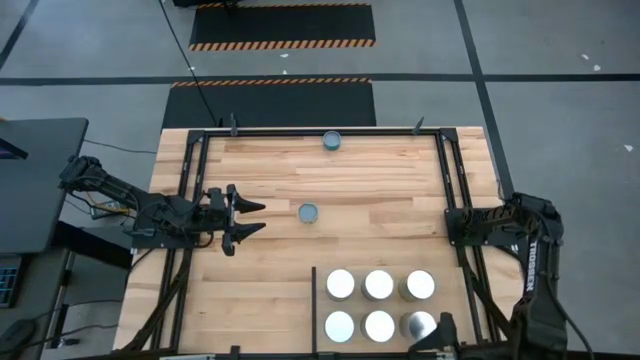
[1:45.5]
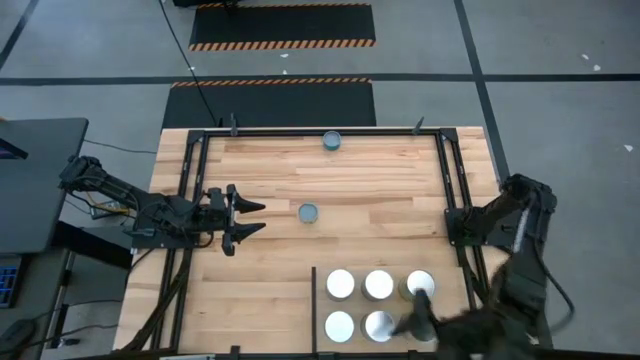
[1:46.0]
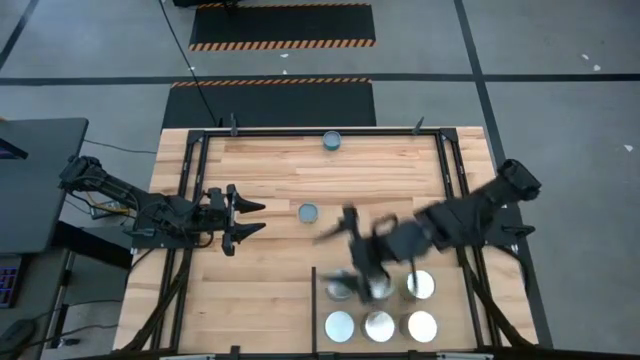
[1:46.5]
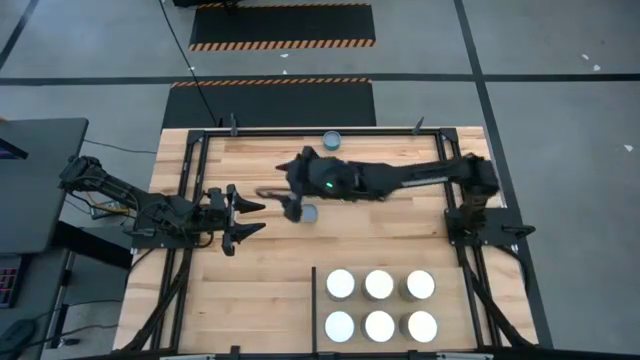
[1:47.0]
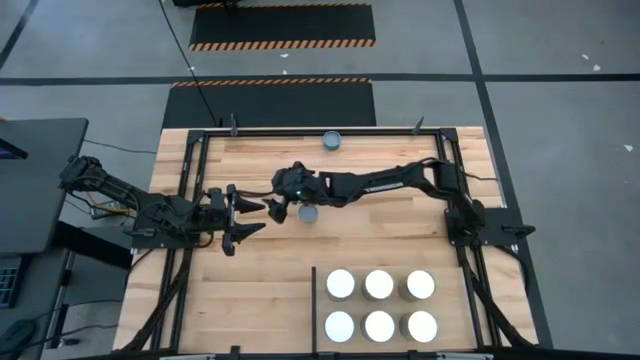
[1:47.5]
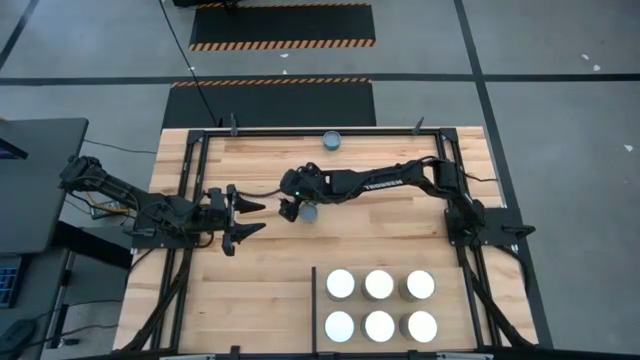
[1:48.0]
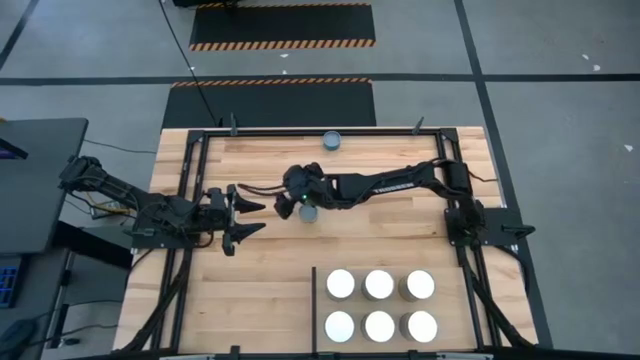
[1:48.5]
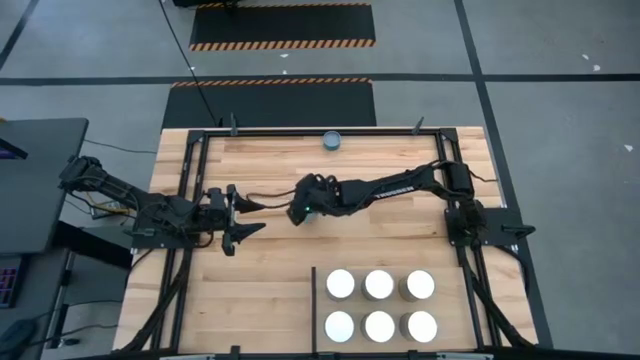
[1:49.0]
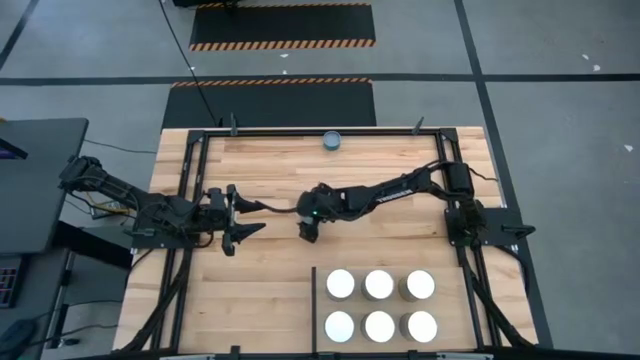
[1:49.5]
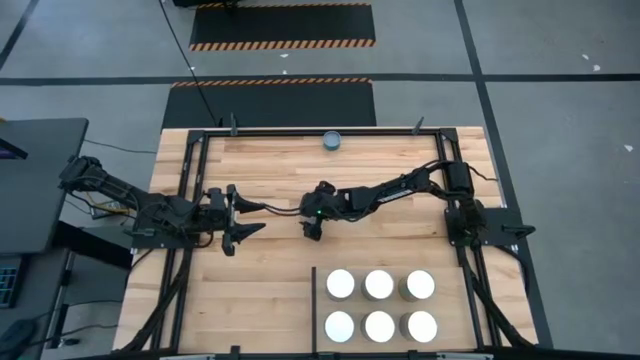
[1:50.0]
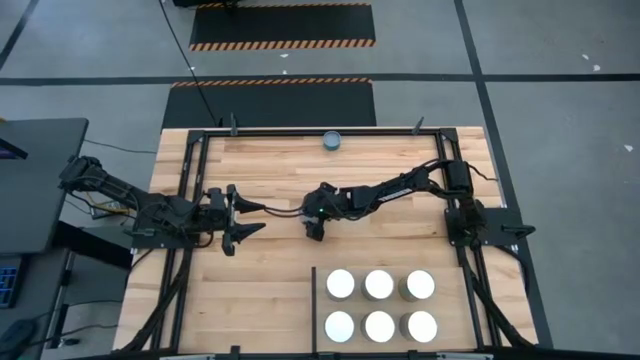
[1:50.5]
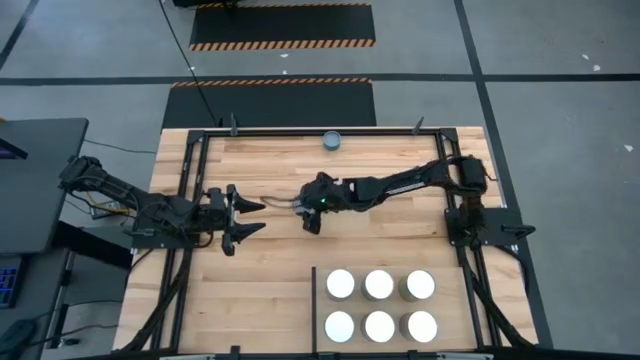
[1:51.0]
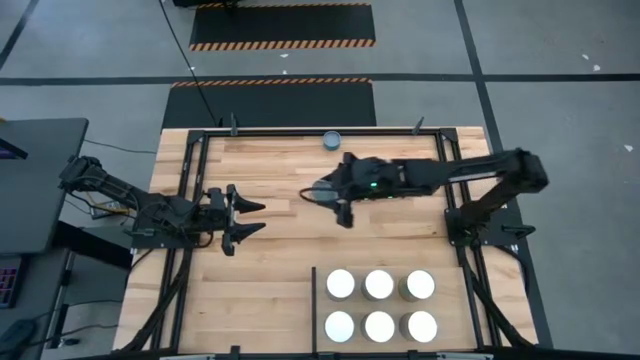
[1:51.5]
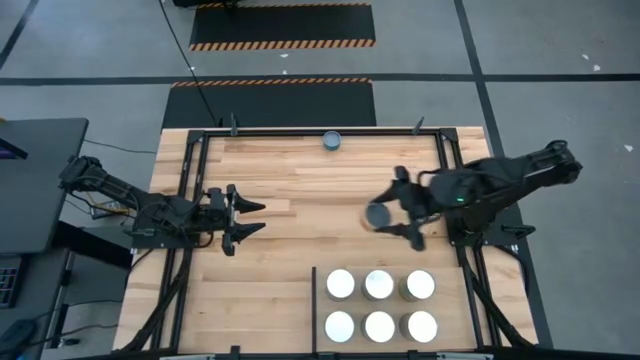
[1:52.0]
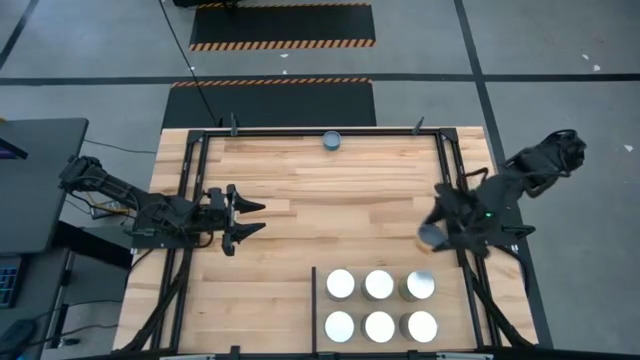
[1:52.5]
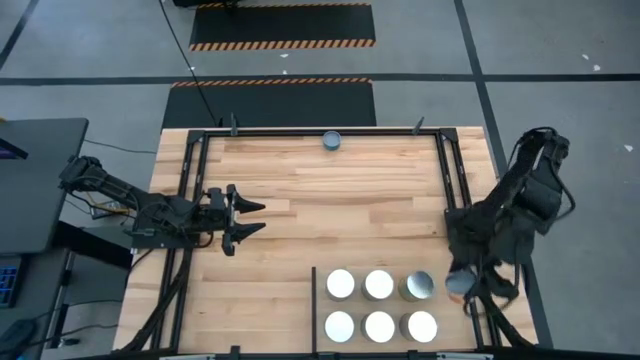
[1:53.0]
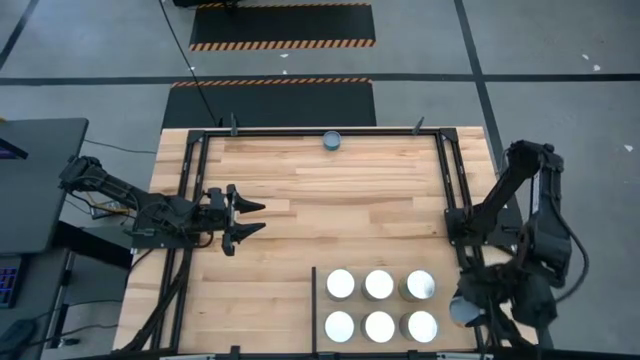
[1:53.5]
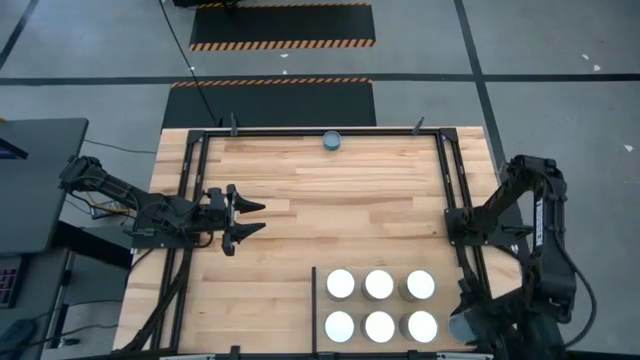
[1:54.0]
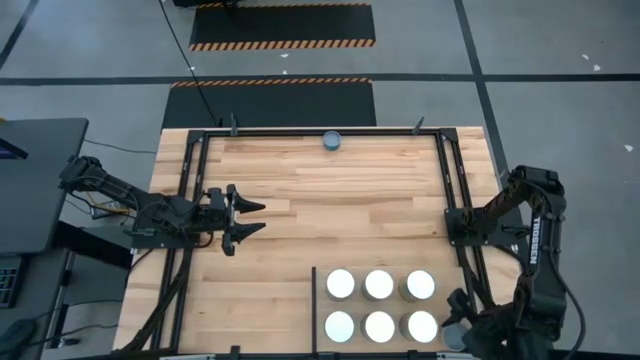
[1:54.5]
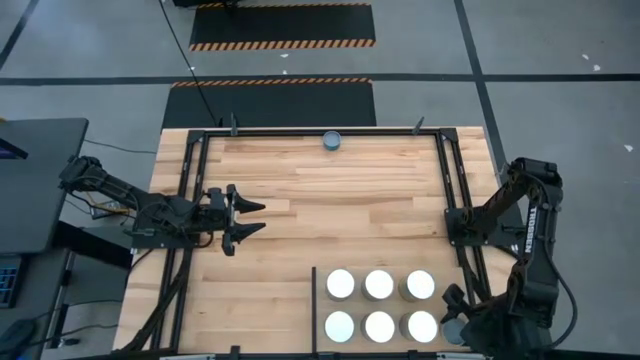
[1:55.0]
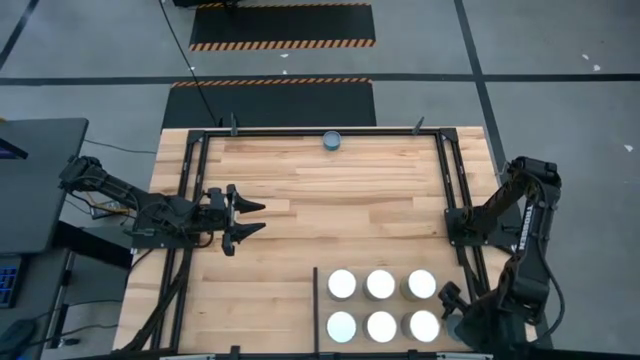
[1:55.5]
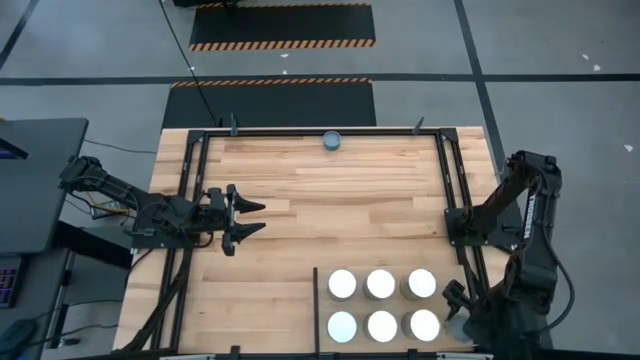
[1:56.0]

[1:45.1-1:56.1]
Task: Pick and place cans onto a shelf
Put the canned mushrooms on the shelf

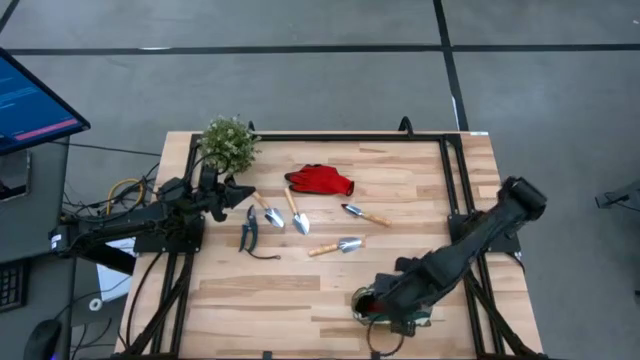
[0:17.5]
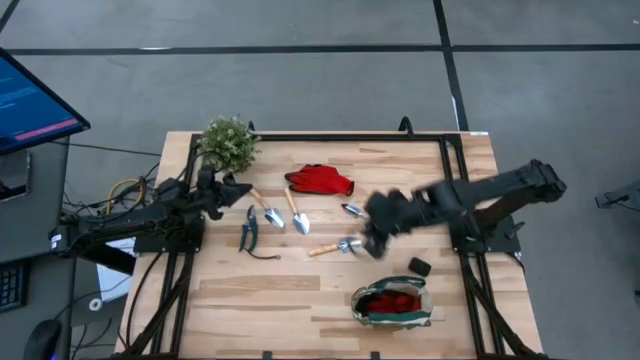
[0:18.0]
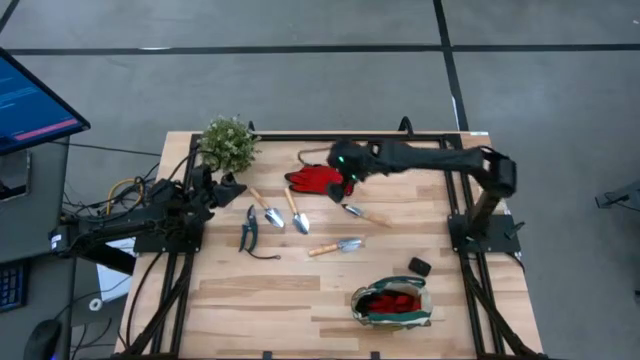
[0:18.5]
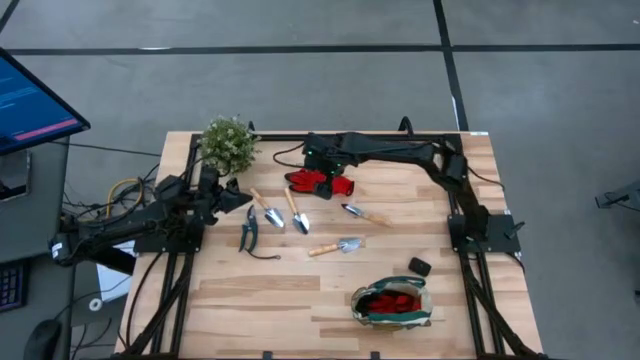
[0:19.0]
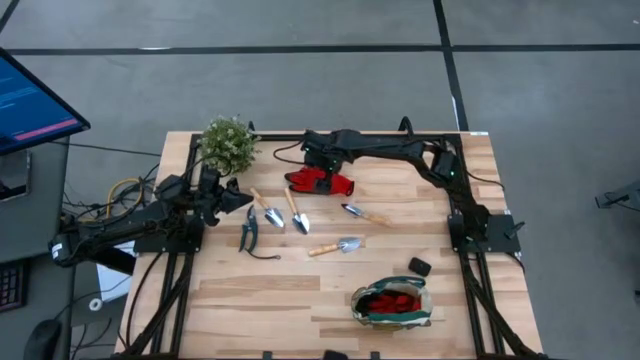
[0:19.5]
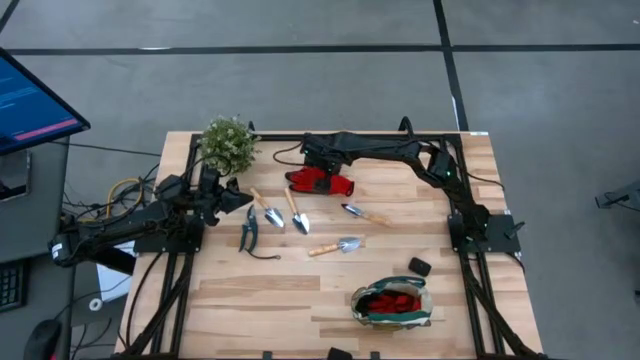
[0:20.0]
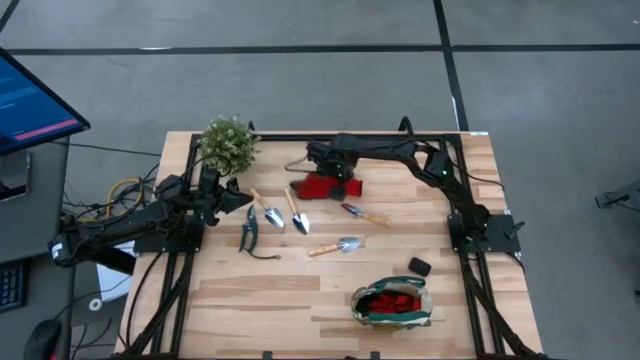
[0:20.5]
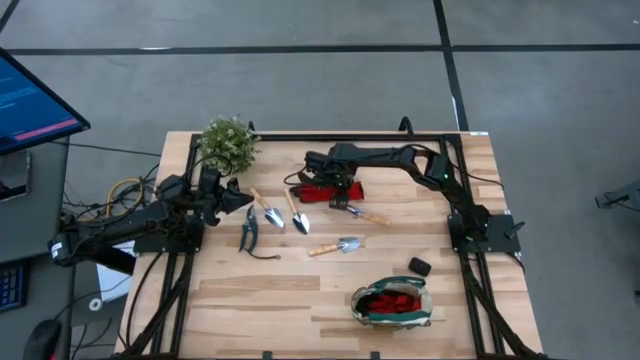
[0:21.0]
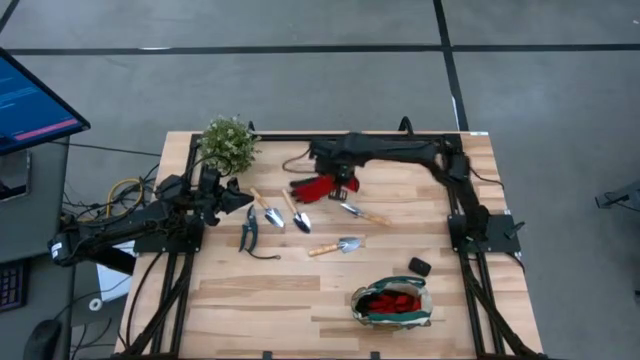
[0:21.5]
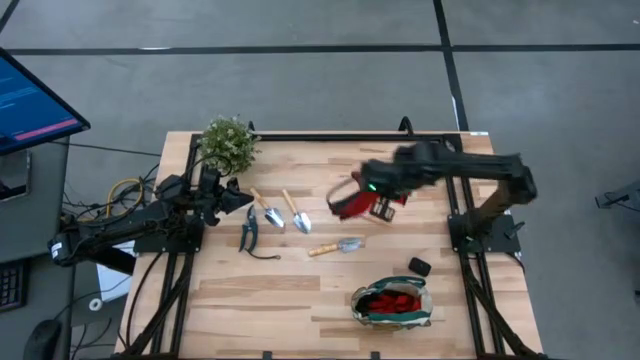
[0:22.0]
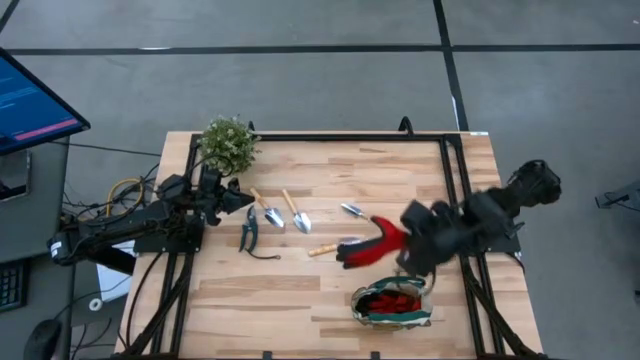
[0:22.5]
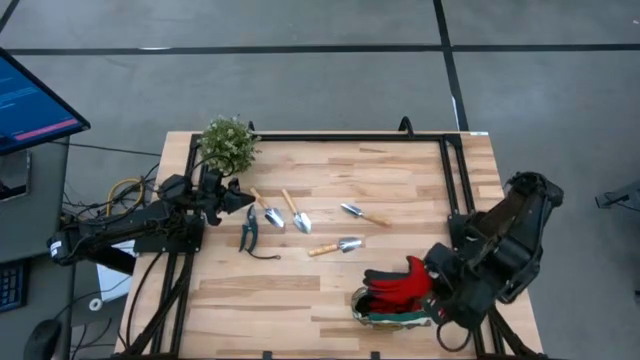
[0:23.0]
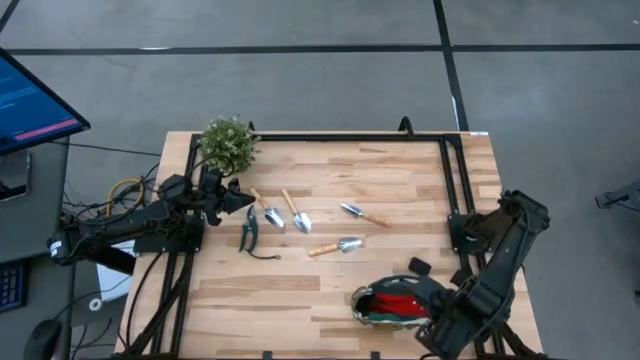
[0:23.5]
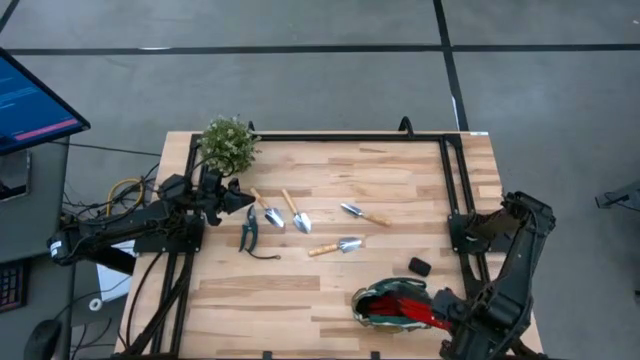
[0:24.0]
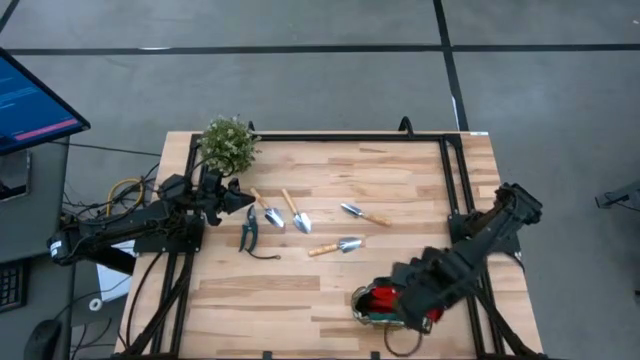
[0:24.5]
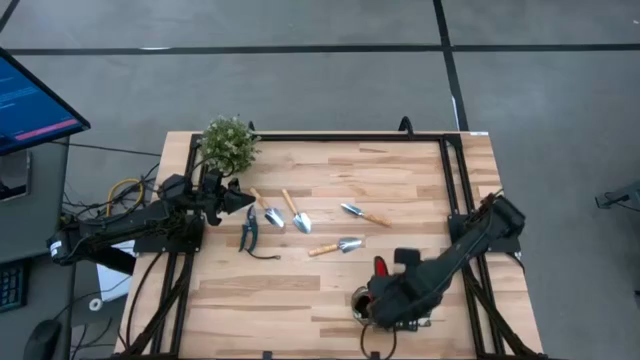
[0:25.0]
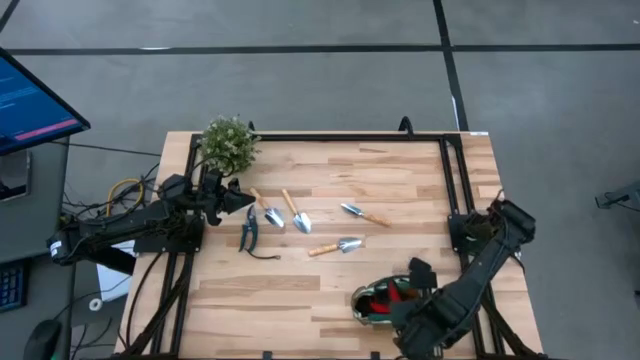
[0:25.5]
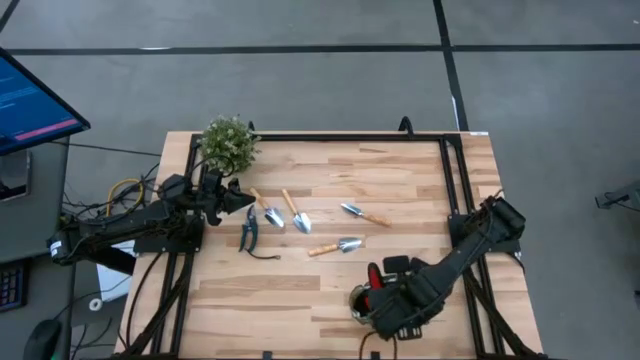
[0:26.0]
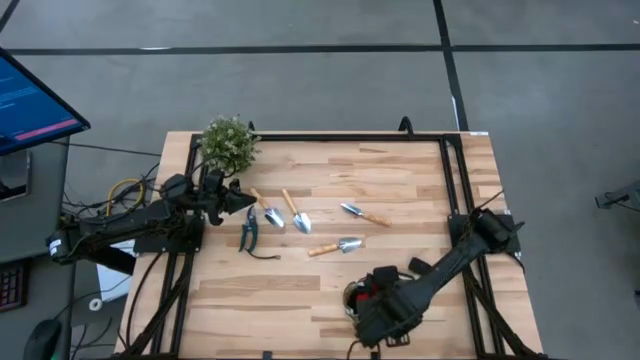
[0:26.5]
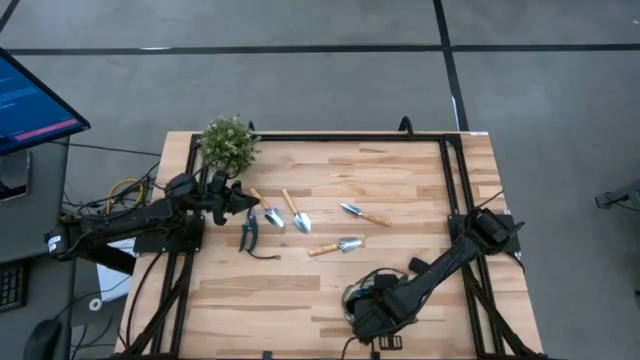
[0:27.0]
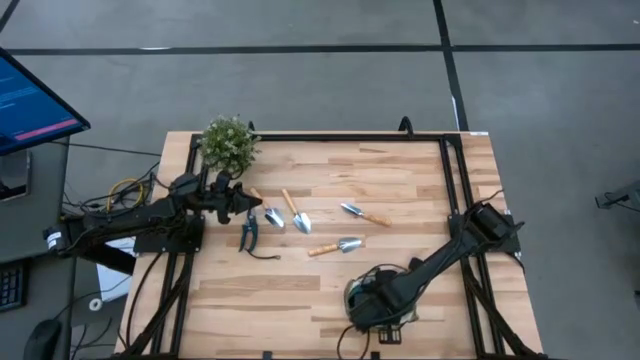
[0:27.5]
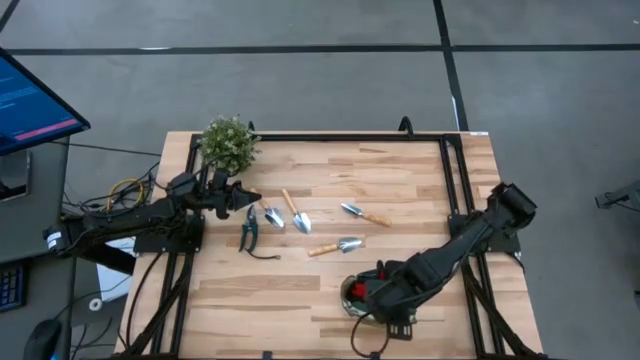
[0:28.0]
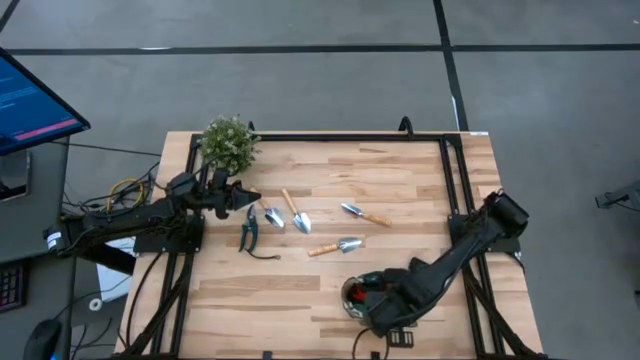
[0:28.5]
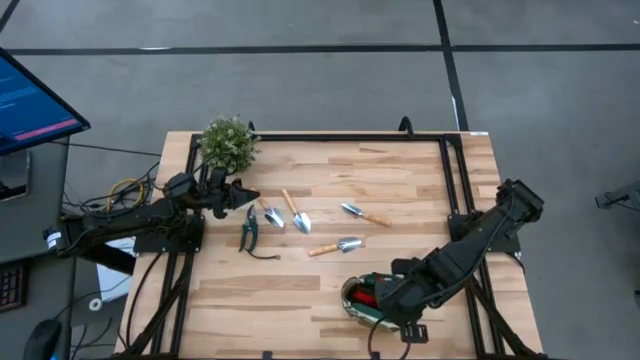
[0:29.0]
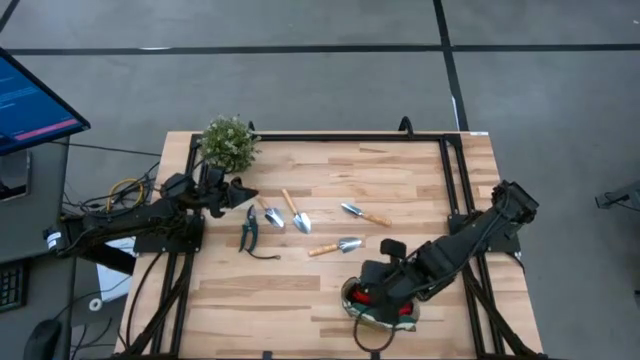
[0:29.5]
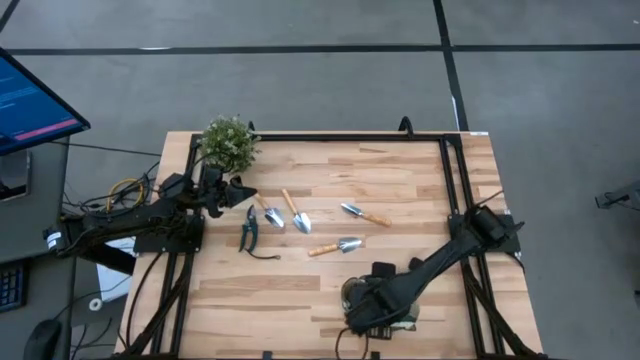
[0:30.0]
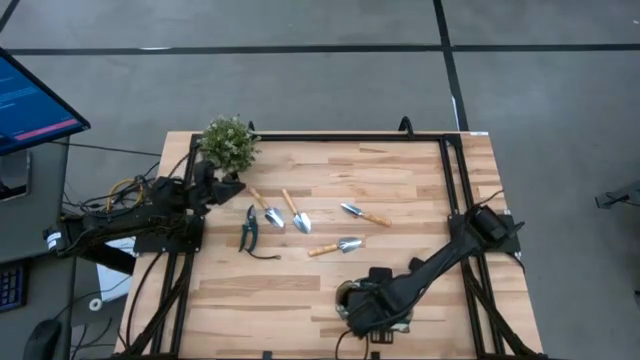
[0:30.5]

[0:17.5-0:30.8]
Task: Pick & Place Garden tools in Gardening bag
Put the red glove into the gardening bag
